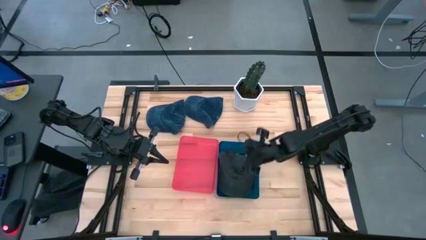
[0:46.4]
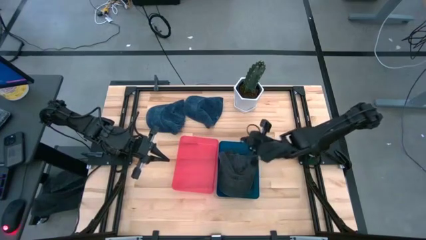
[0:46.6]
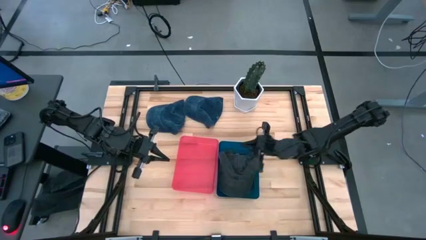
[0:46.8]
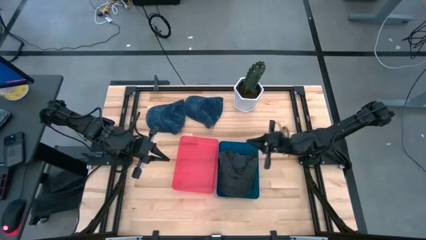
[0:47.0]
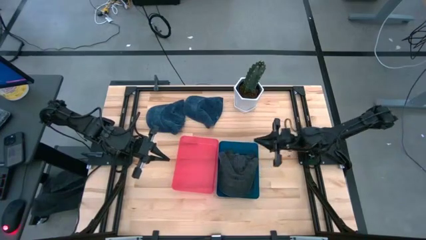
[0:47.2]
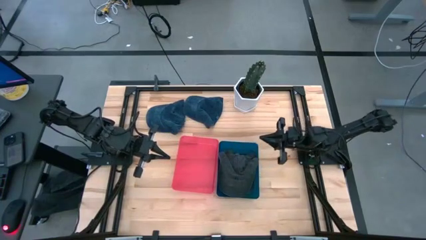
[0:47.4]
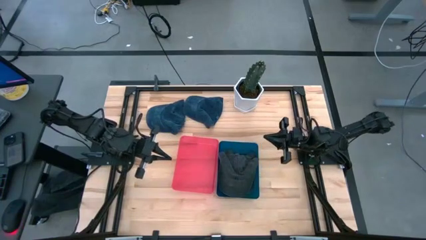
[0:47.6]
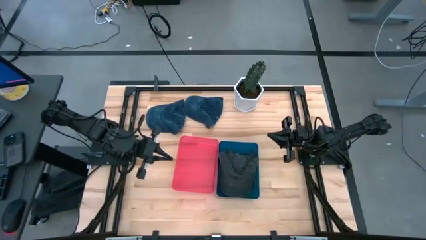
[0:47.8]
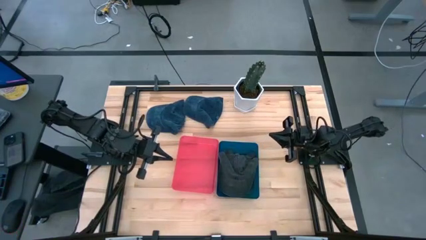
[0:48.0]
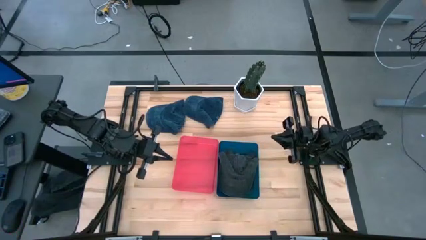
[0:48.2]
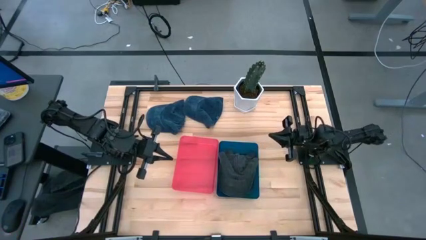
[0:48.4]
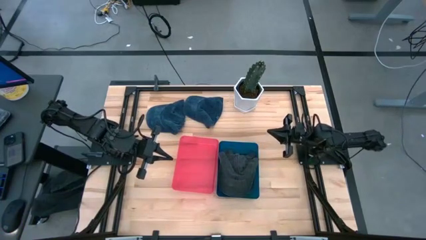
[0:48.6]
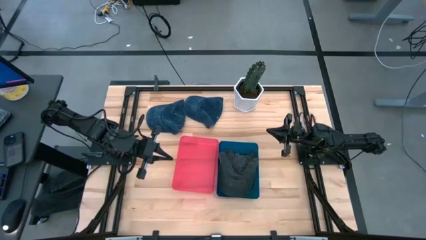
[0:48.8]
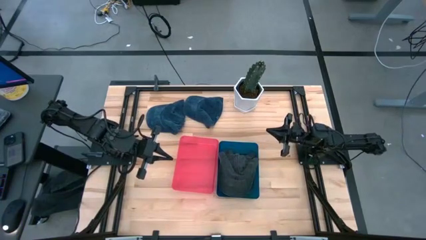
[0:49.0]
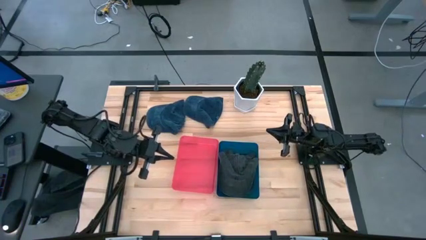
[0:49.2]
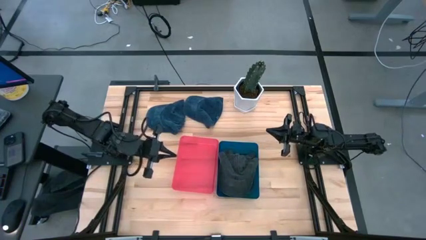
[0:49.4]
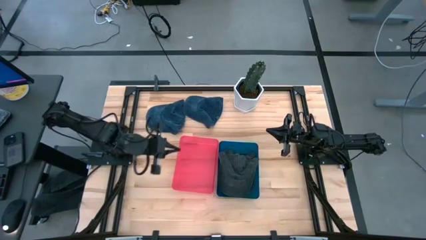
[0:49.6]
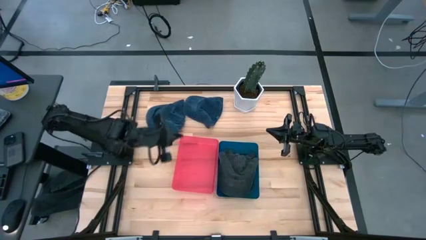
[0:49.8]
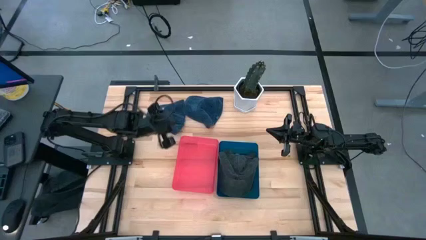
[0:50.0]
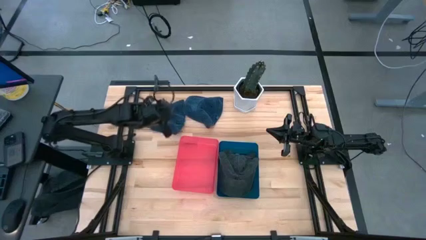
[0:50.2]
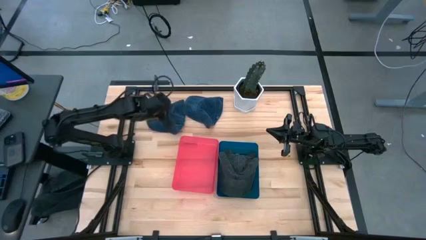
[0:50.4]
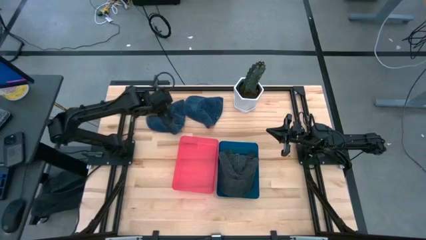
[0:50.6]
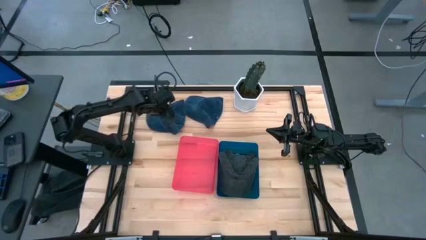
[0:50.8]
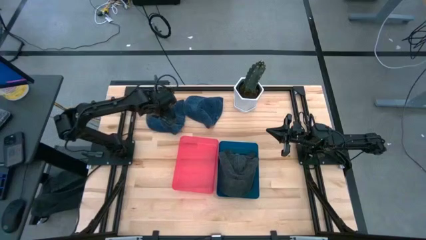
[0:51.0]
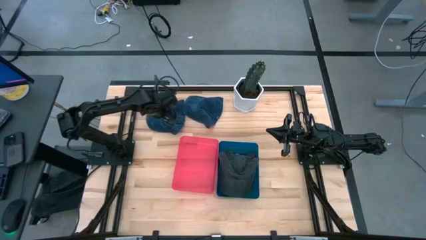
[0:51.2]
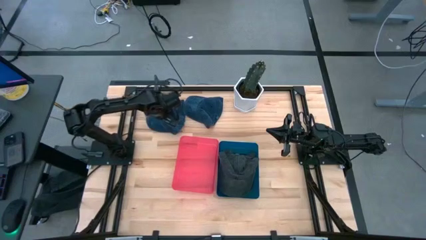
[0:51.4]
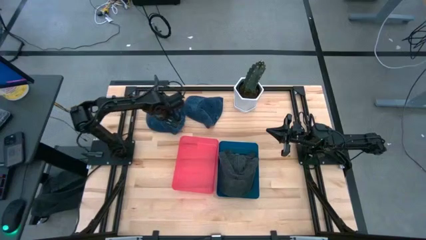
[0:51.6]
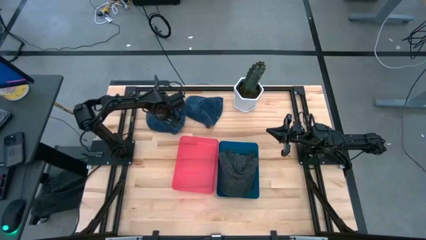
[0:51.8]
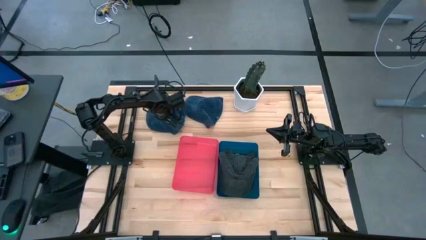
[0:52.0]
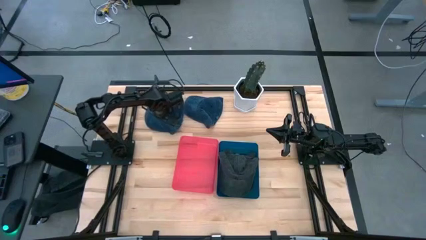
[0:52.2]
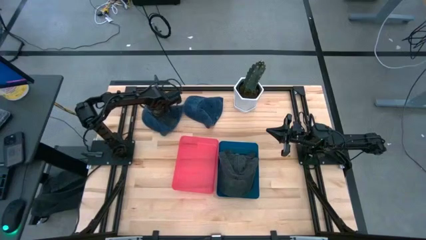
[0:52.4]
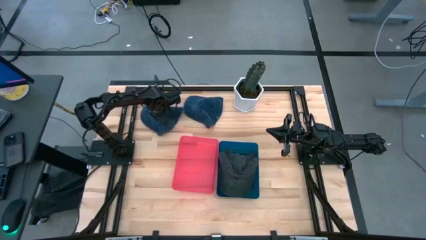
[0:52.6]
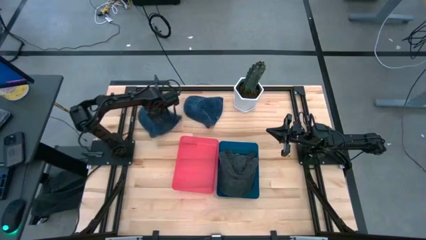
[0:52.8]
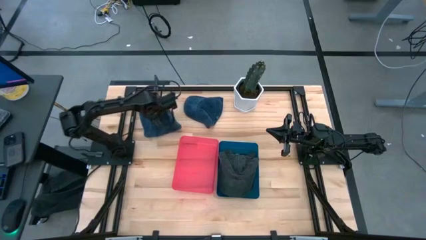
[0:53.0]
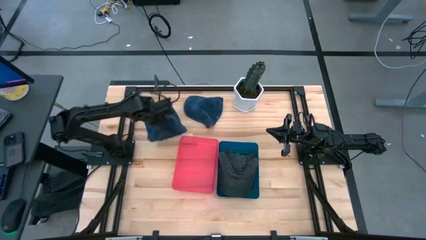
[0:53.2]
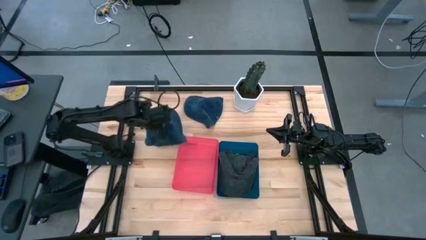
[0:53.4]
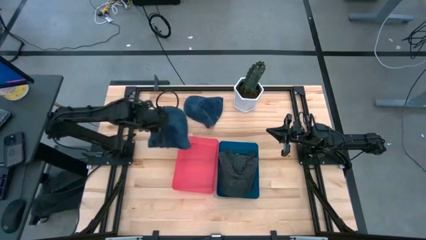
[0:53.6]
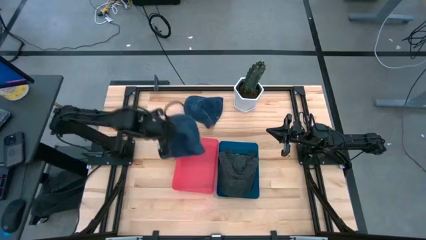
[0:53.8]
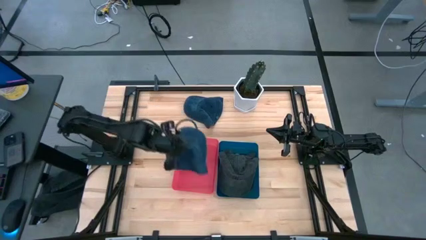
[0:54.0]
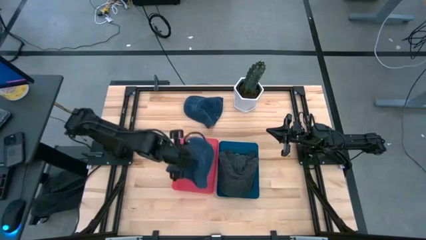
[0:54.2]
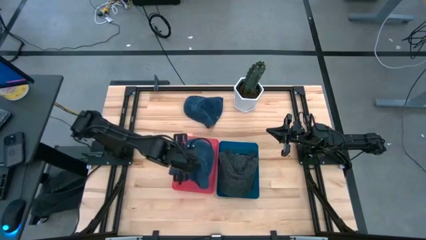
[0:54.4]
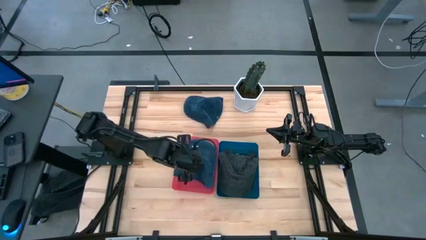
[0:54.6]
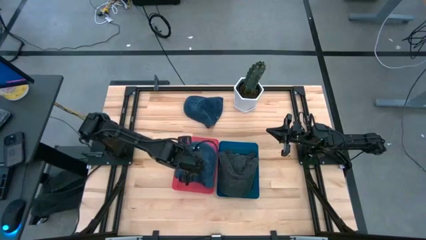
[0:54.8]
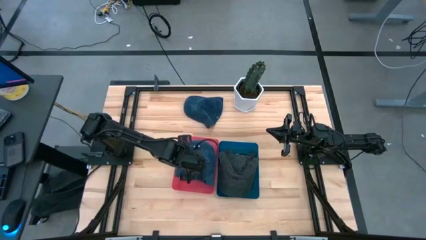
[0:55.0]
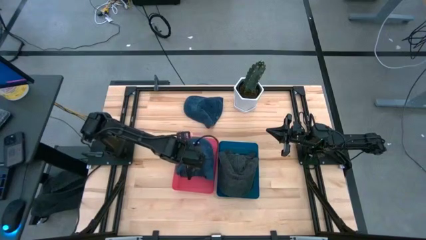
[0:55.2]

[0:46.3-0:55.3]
Task: Pick & Place hat
Put the left blue cap into the red bin

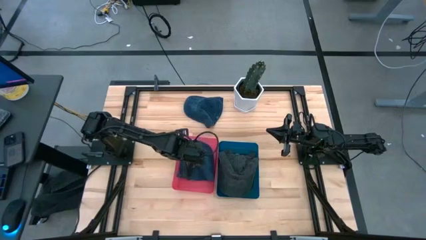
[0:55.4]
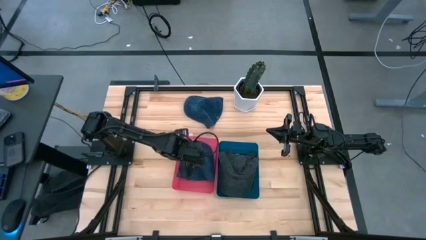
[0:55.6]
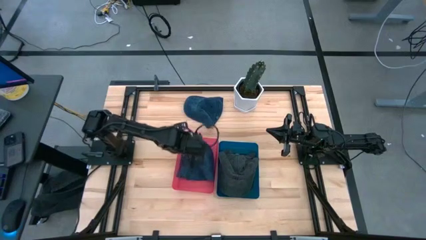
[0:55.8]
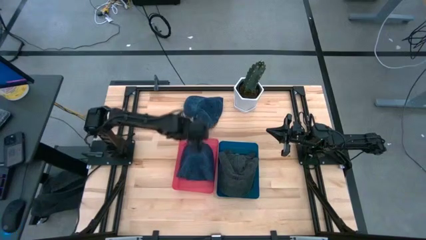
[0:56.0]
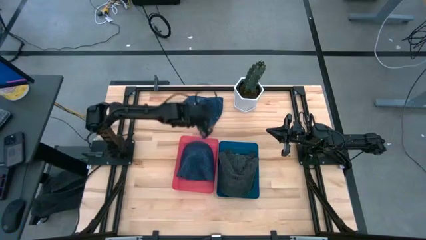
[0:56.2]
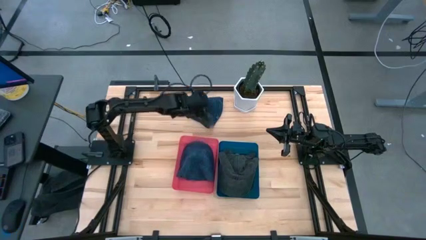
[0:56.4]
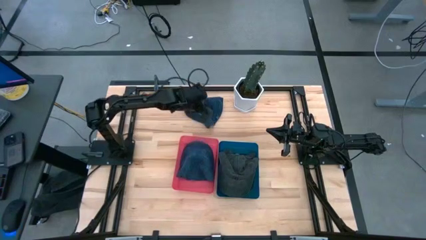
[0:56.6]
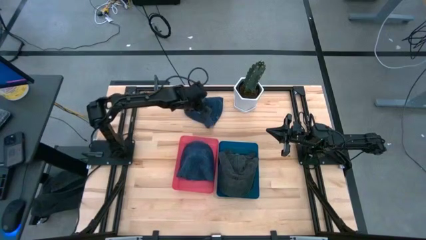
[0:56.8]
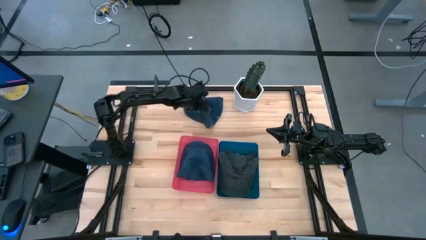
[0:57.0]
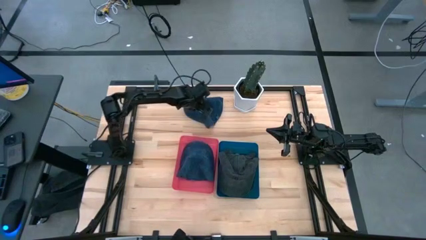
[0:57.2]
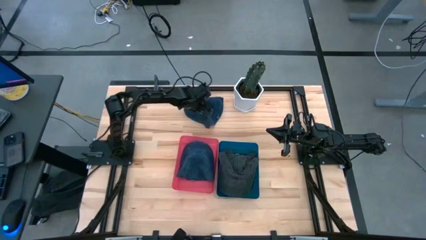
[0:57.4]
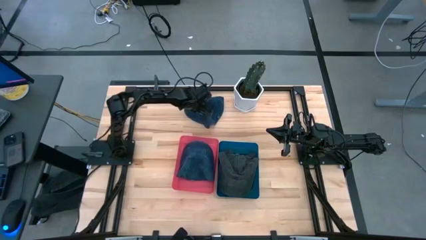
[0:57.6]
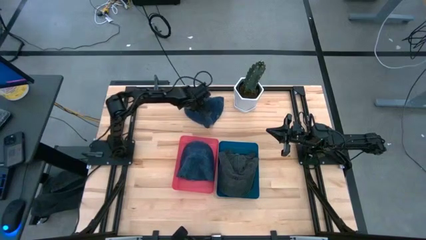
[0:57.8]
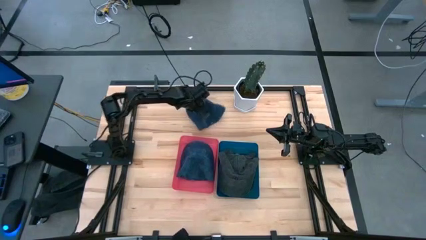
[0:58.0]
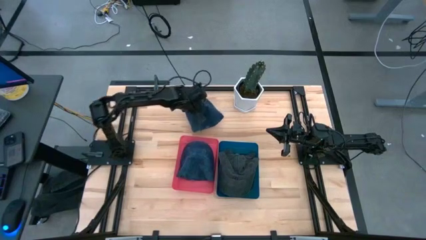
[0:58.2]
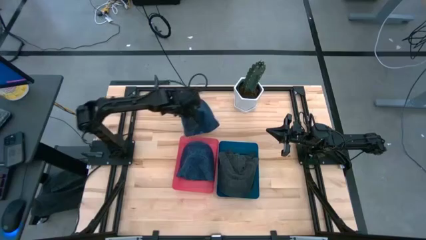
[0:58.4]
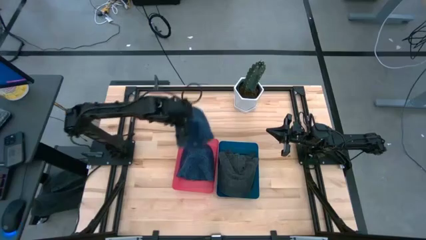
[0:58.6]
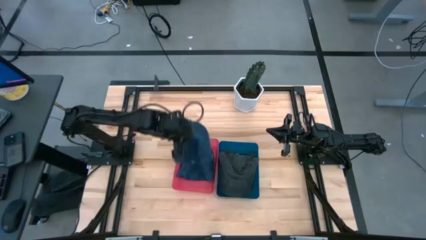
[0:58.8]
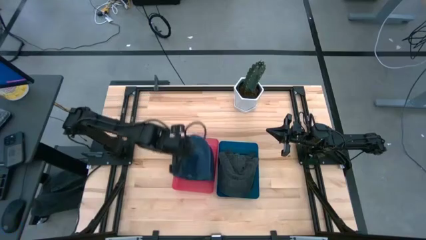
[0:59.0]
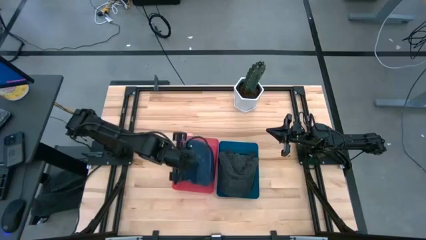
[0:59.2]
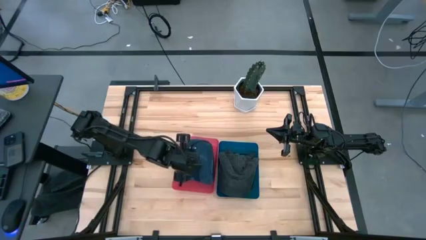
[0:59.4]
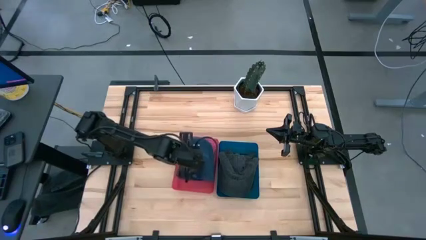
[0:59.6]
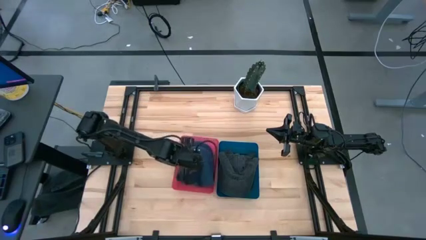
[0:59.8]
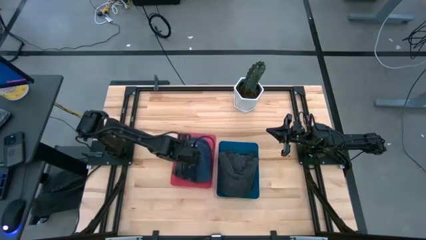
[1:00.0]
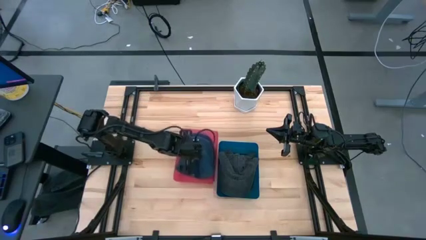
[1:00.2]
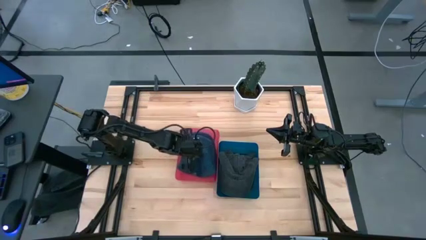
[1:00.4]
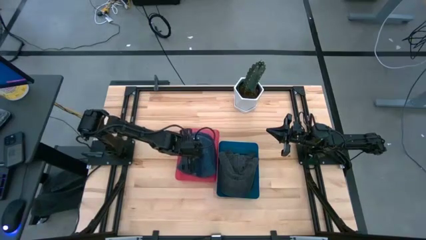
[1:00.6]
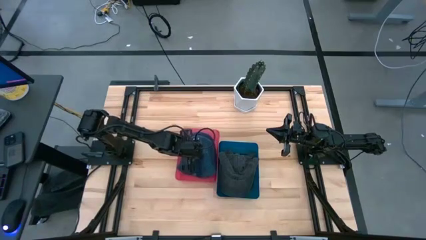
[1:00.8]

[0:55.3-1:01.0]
Put the blue cap into the red bin
